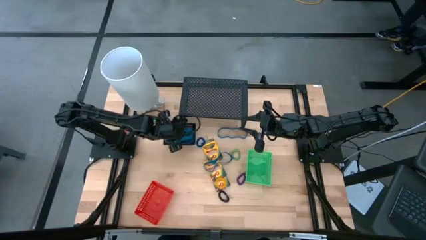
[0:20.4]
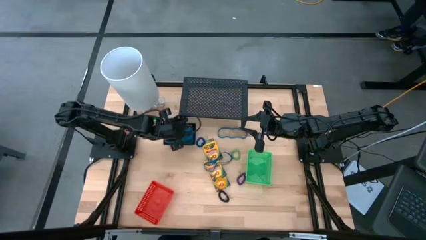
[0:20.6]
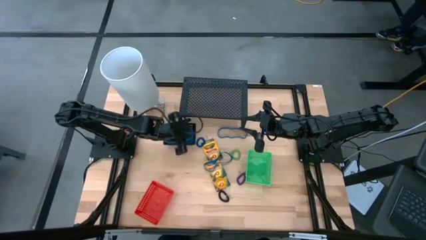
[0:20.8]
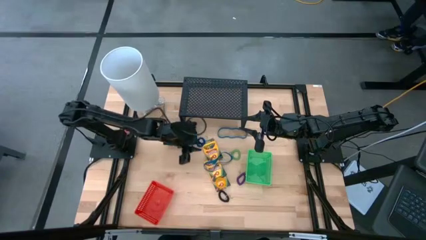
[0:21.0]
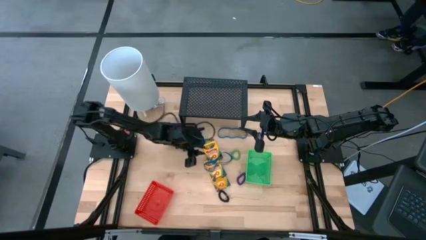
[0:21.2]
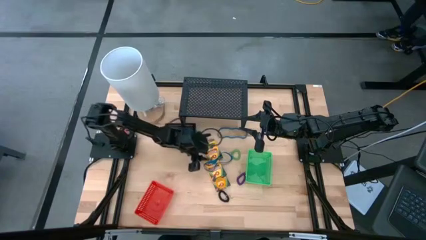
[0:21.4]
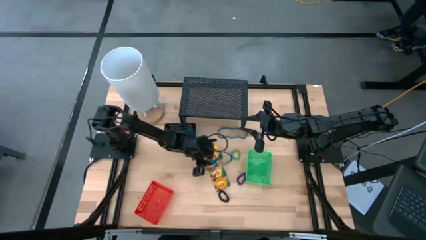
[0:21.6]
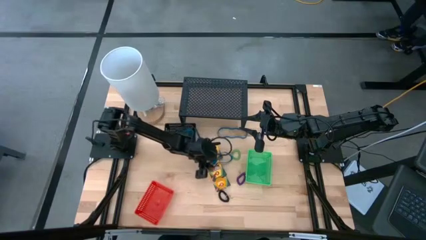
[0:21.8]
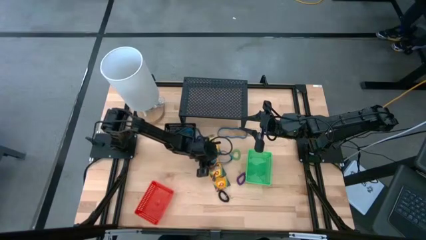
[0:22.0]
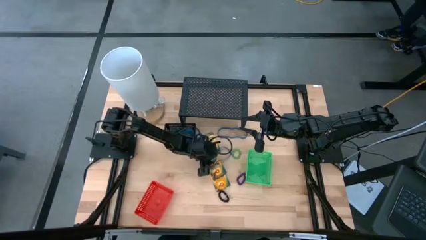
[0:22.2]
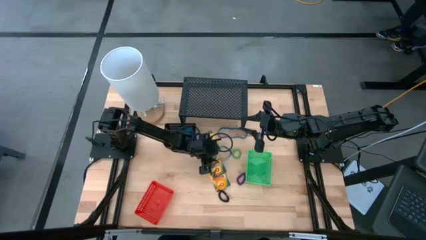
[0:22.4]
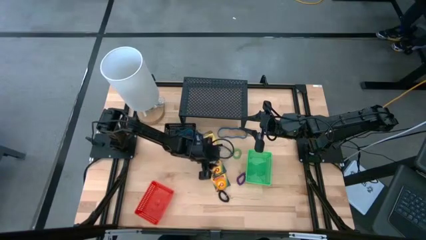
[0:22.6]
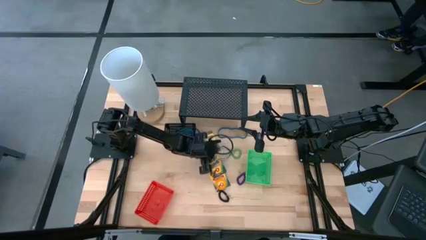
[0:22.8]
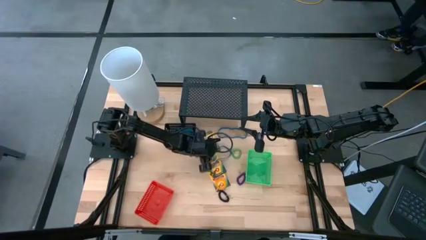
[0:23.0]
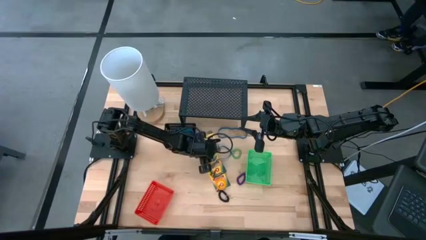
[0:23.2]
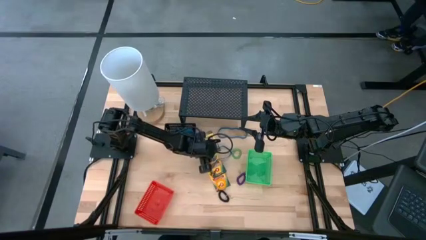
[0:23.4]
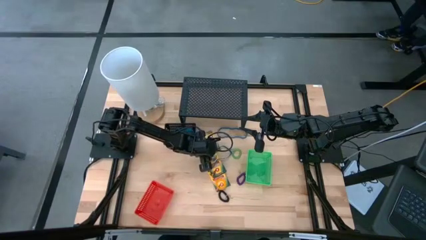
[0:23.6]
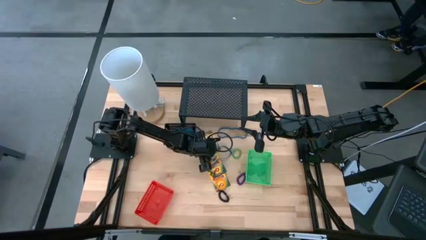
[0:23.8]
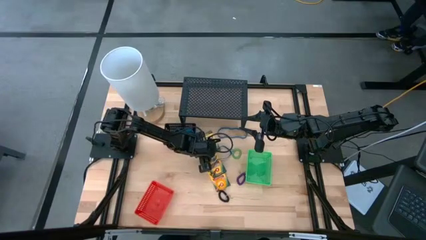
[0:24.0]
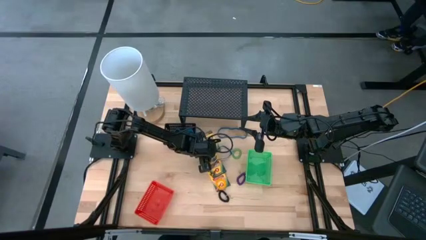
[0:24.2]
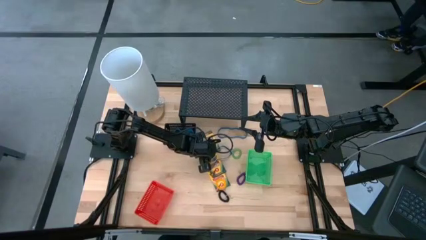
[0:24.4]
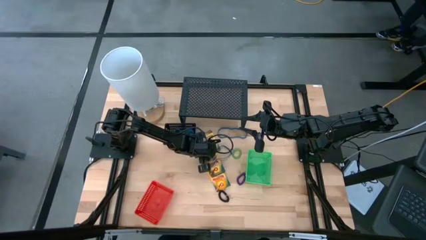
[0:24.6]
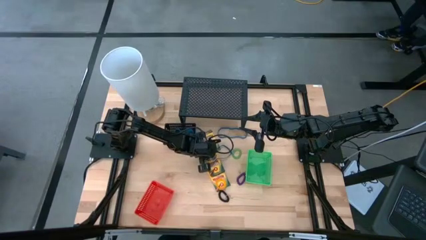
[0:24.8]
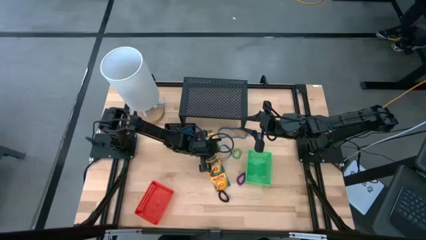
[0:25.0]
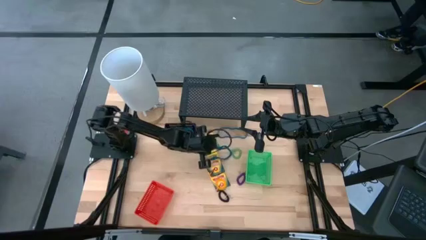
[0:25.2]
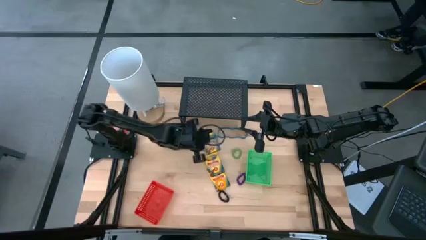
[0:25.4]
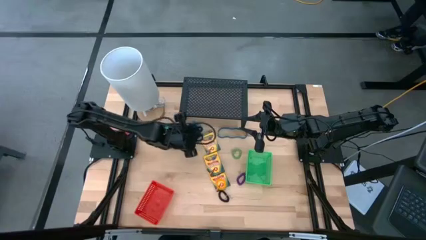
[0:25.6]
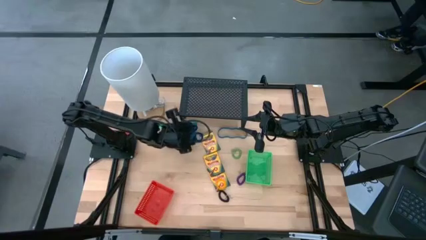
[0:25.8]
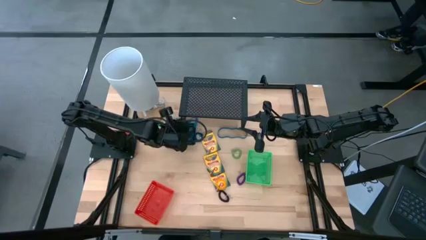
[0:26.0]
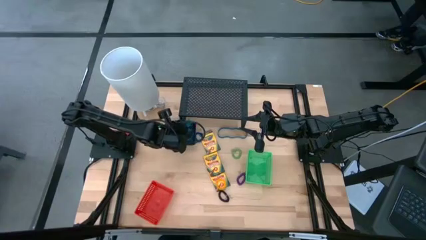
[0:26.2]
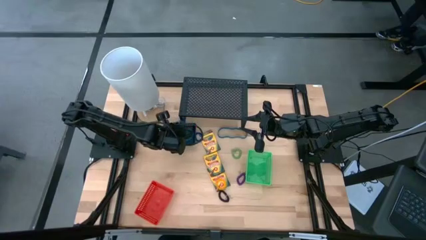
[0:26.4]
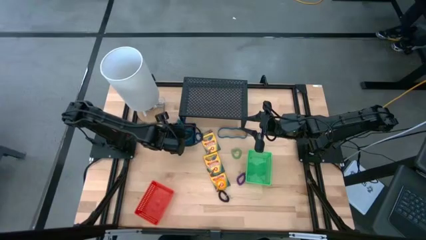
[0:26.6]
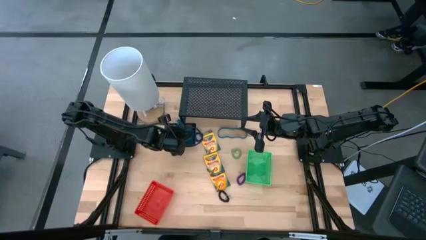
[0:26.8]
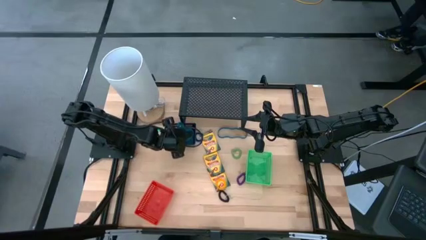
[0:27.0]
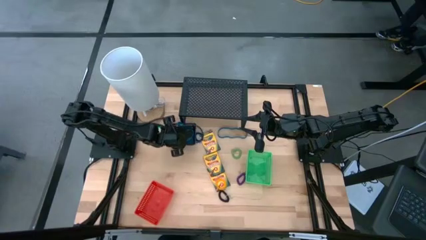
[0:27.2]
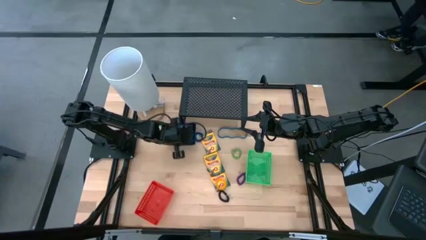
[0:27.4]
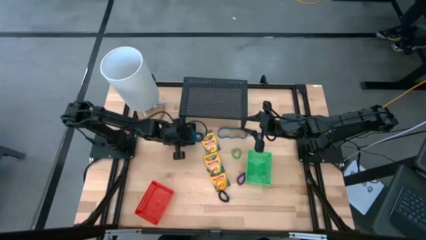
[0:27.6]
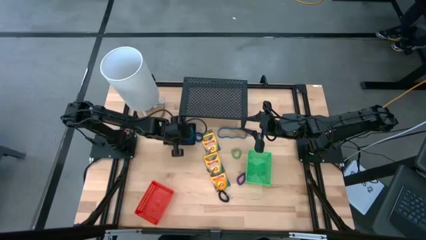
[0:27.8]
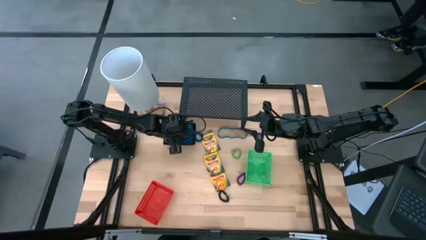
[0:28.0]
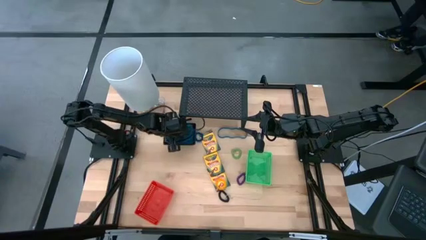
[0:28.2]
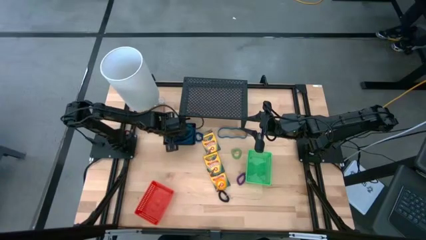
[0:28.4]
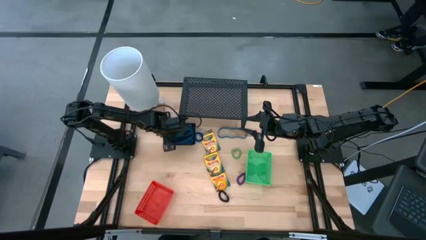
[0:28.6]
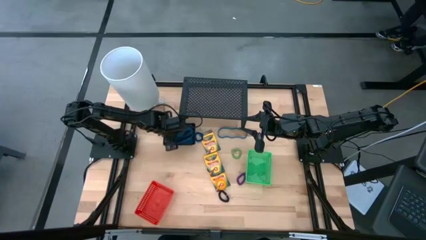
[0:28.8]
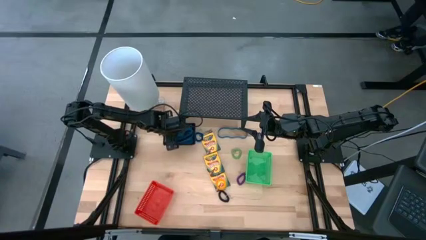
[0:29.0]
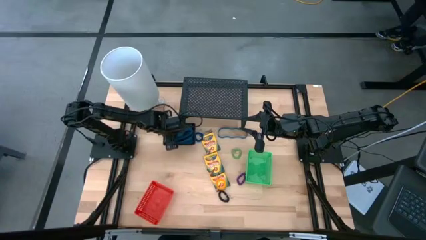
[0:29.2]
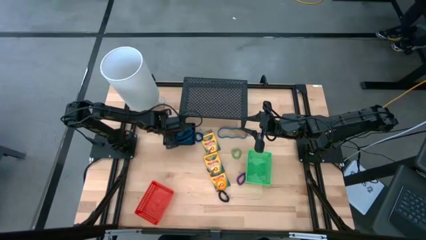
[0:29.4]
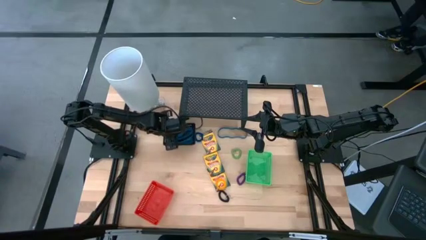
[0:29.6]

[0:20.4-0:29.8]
Task: Pick & Place Office Desk Supplies
Put the blue rubberband into the black bin

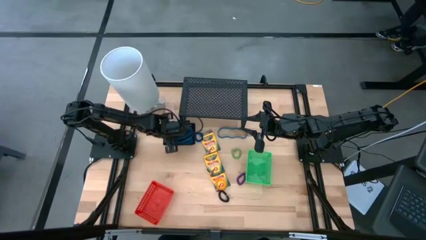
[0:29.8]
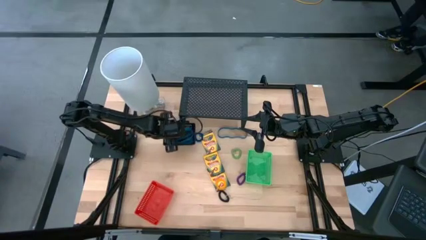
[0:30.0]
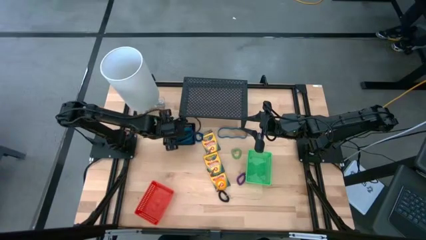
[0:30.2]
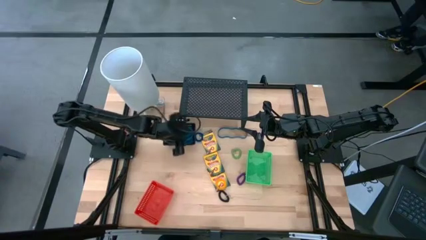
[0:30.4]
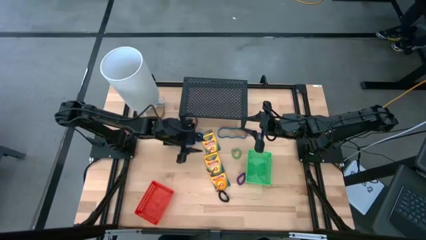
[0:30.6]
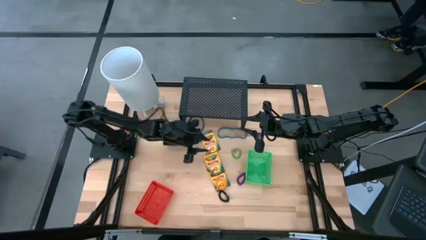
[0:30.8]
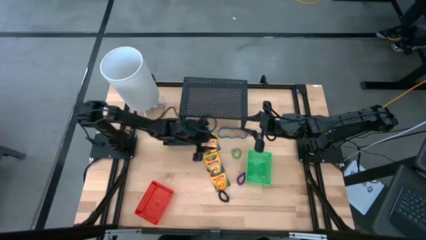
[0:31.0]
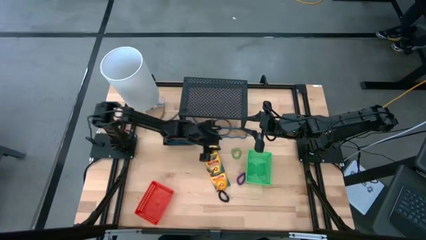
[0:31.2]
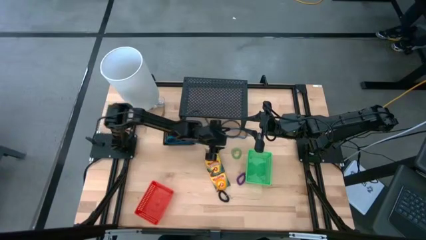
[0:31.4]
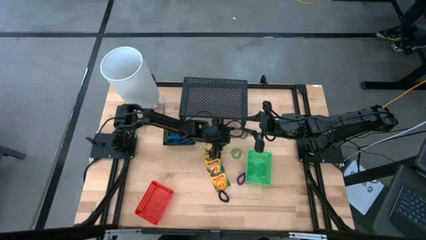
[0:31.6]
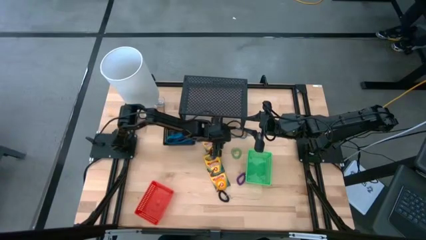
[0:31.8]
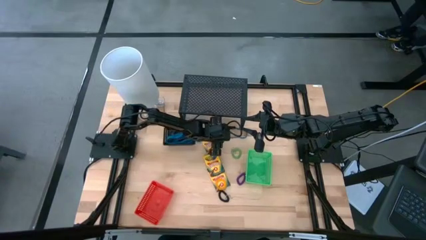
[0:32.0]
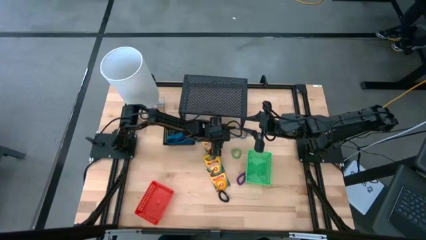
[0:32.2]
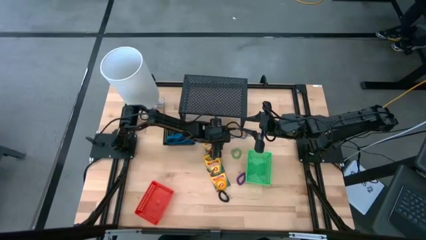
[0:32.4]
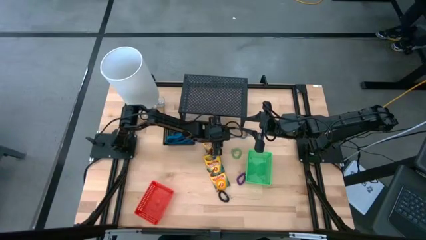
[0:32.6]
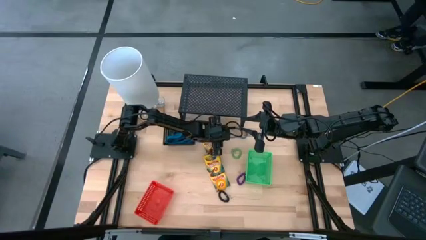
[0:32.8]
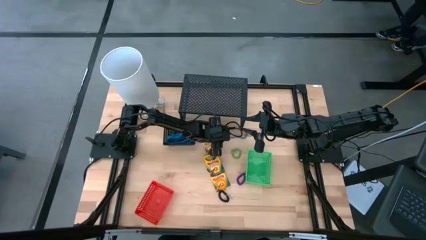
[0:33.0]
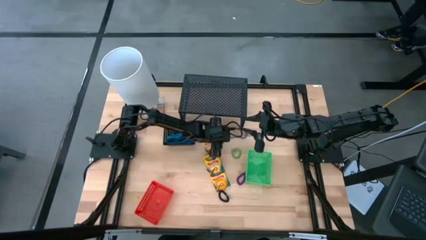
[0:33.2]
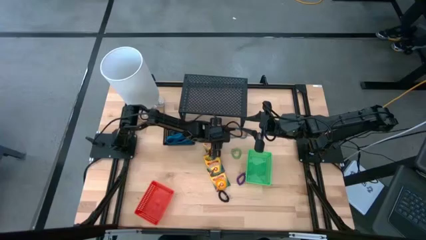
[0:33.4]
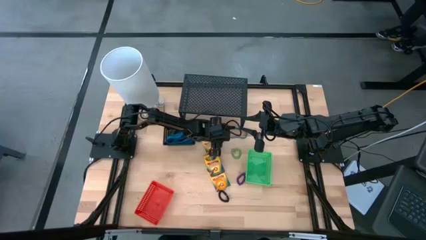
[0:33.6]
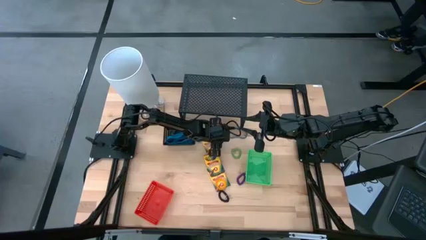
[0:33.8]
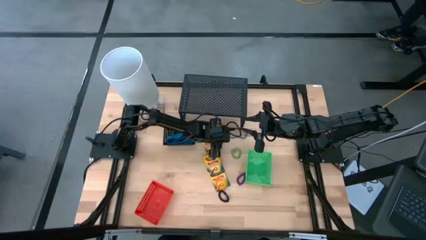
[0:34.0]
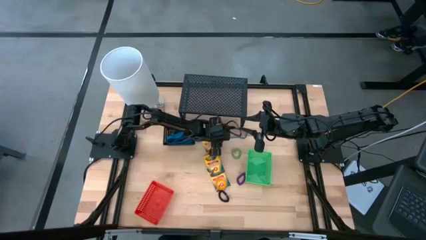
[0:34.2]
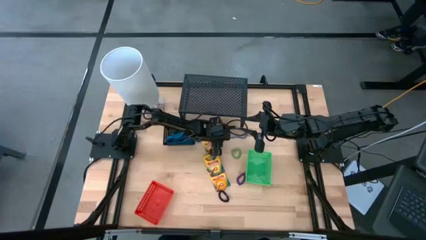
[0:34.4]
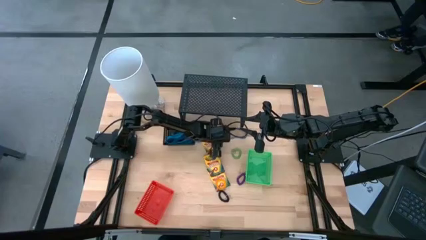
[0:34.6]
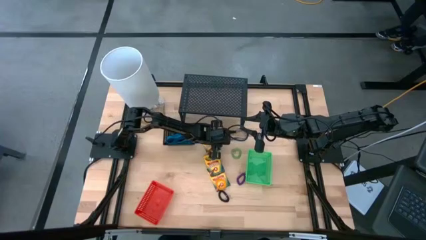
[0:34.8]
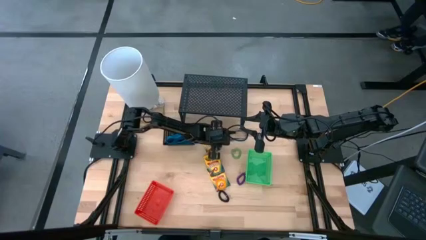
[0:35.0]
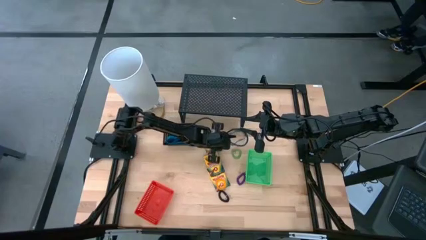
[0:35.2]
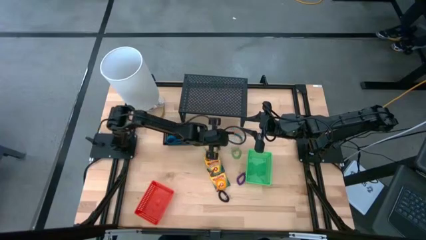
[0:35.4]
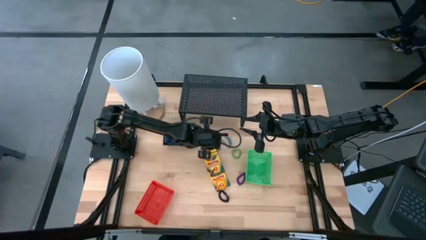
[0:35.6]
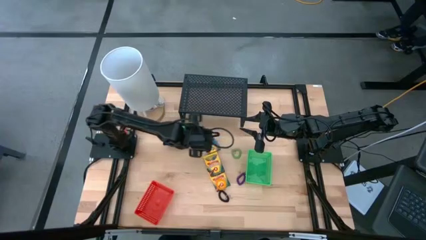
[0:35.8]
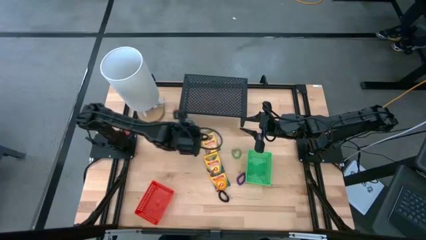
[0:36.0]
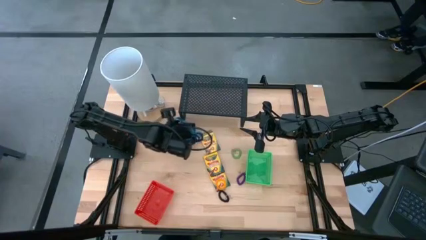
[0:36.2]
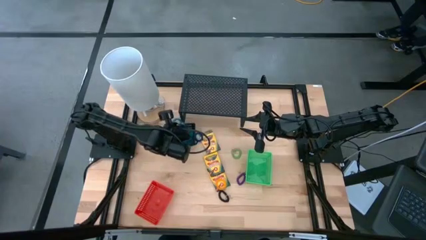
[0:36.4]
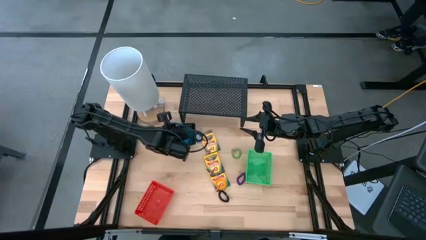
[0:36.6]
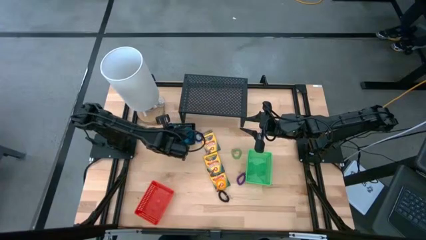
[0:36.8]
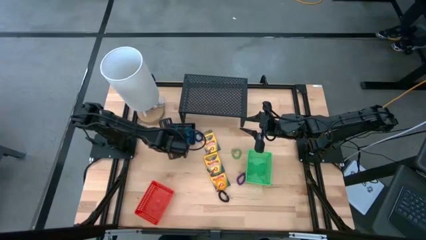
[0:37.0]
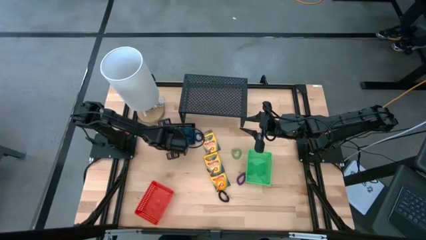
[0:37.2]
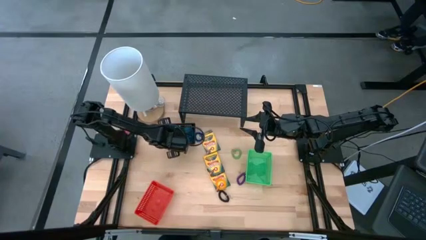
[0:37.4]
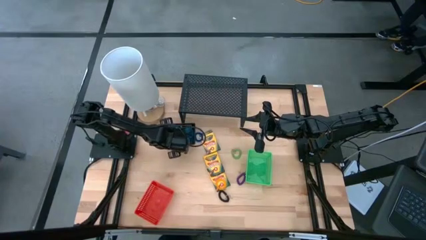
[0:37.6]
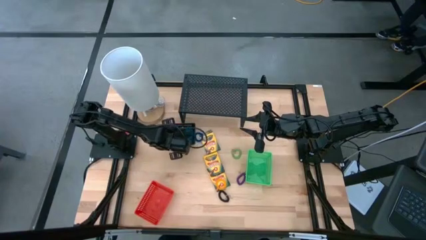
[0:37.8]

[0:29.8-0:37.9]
Put the blue rubberband into the black bin
